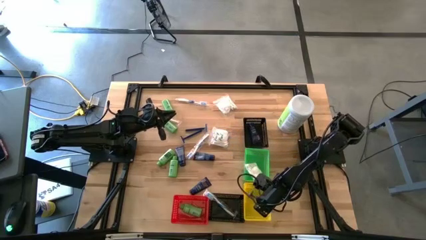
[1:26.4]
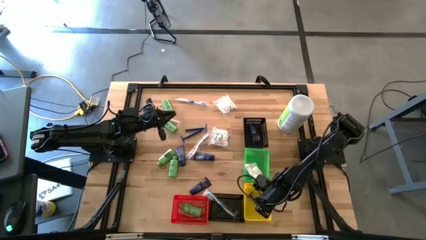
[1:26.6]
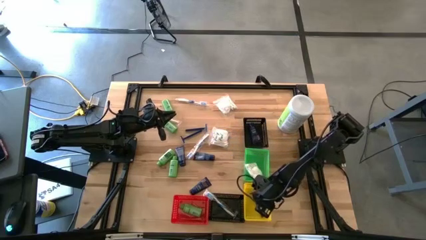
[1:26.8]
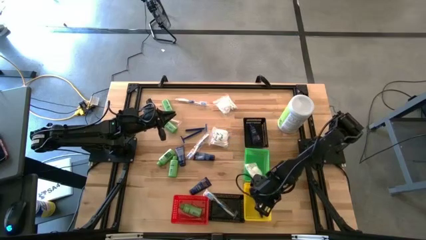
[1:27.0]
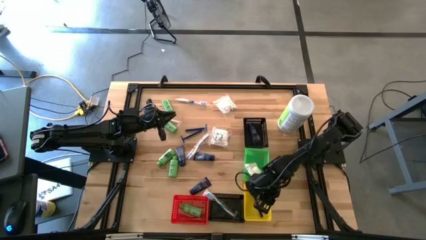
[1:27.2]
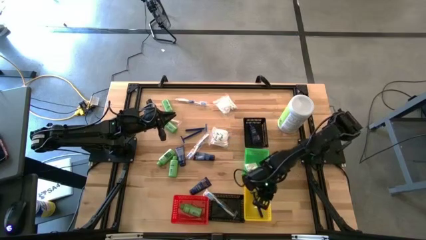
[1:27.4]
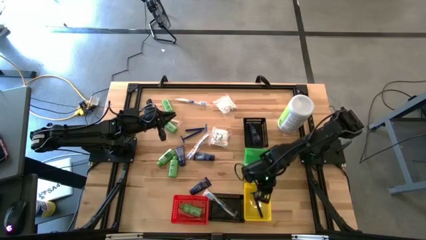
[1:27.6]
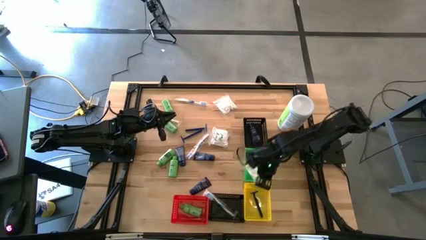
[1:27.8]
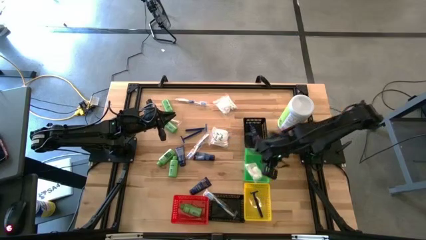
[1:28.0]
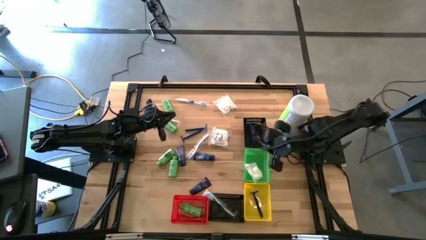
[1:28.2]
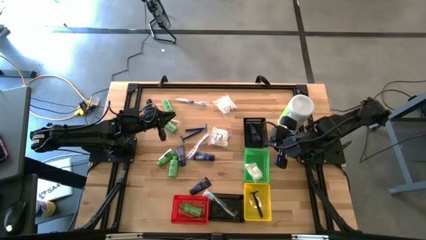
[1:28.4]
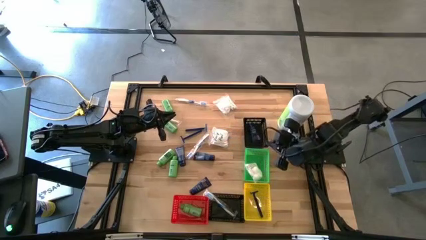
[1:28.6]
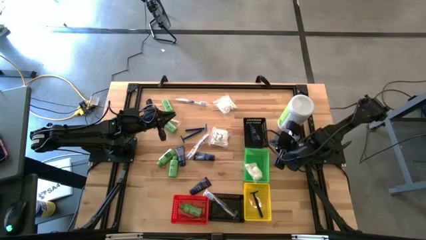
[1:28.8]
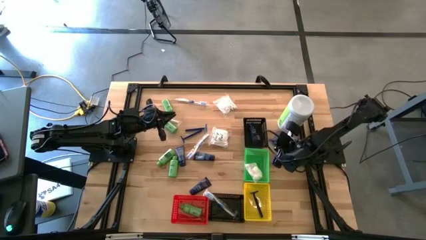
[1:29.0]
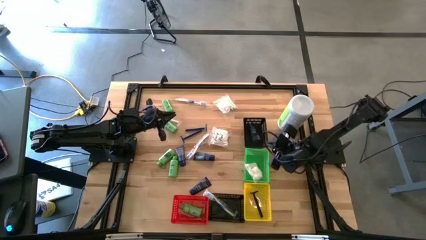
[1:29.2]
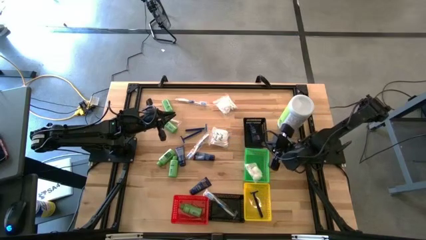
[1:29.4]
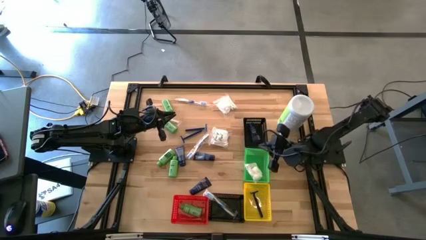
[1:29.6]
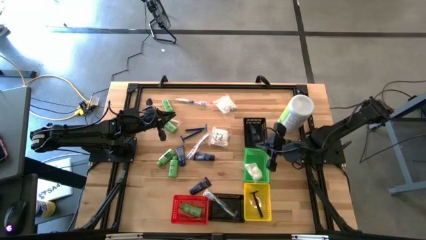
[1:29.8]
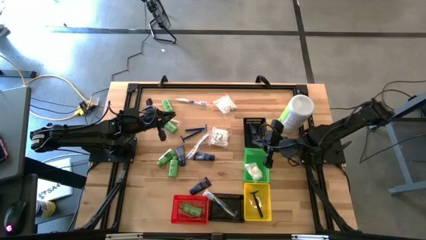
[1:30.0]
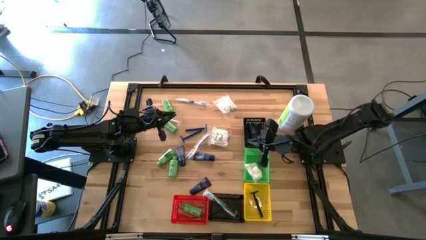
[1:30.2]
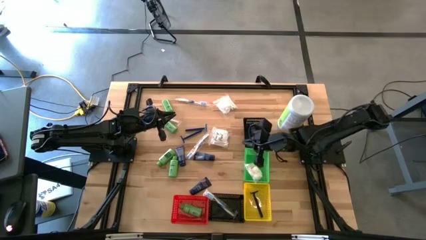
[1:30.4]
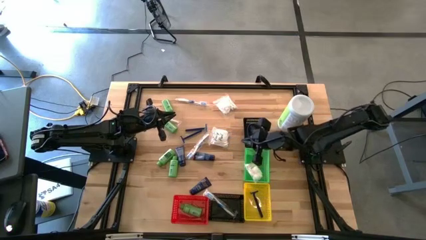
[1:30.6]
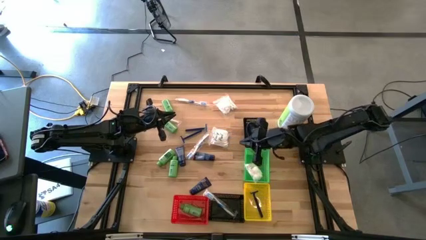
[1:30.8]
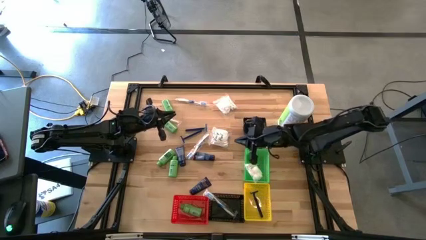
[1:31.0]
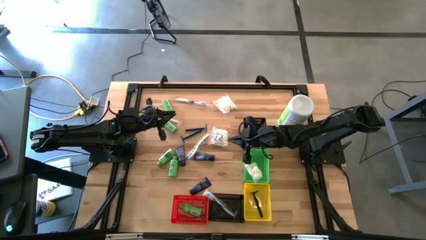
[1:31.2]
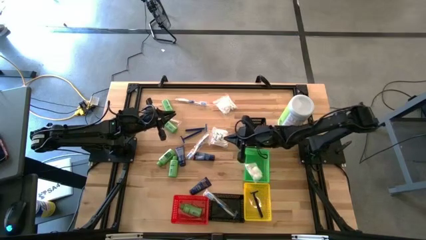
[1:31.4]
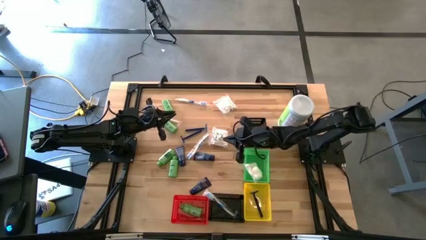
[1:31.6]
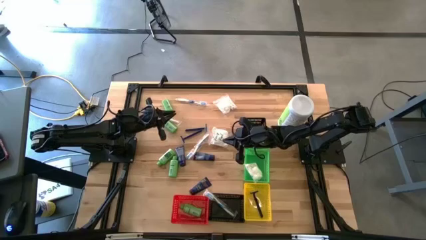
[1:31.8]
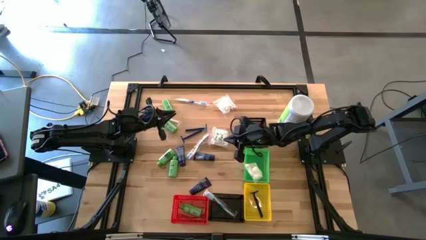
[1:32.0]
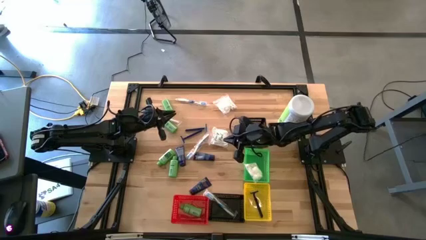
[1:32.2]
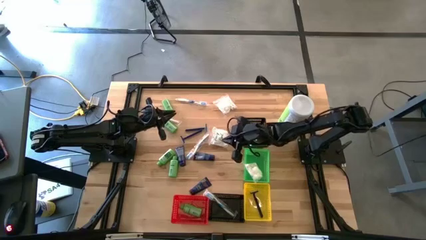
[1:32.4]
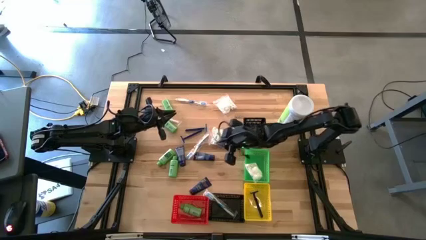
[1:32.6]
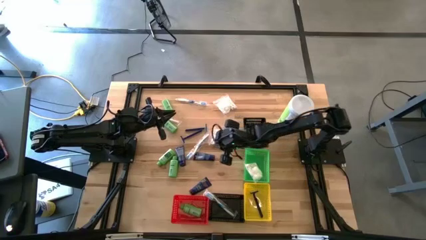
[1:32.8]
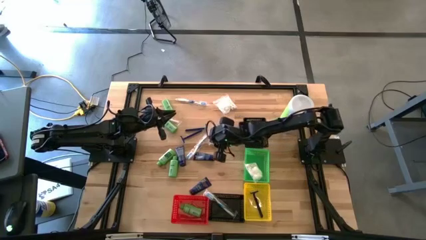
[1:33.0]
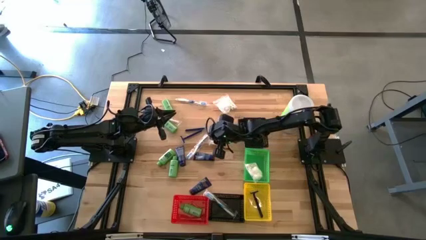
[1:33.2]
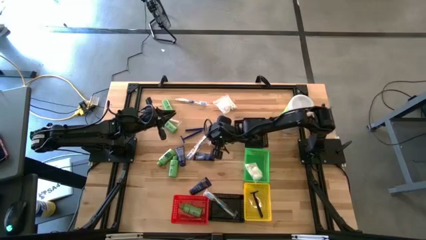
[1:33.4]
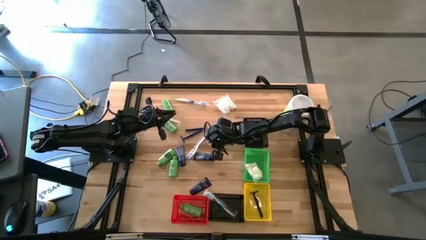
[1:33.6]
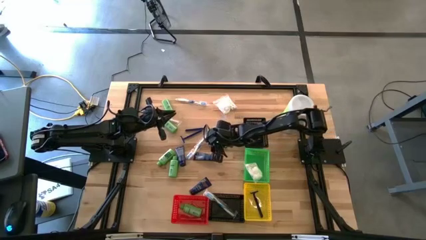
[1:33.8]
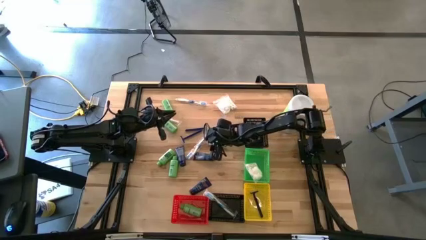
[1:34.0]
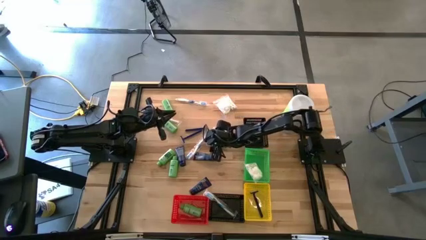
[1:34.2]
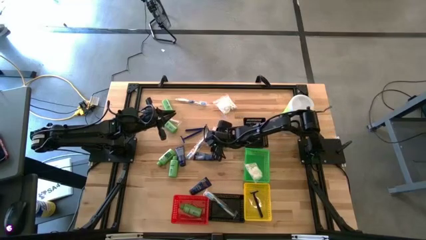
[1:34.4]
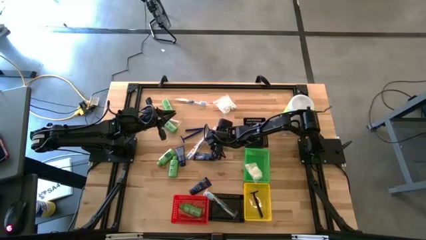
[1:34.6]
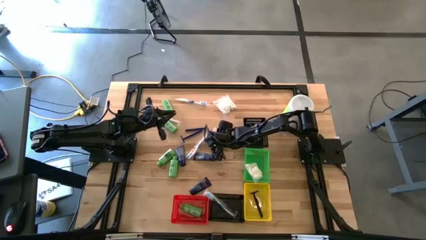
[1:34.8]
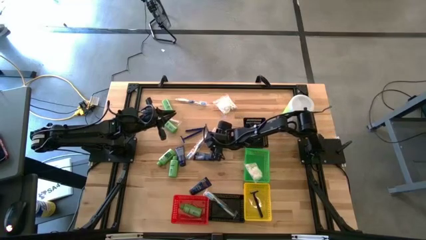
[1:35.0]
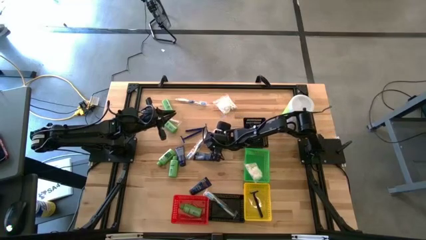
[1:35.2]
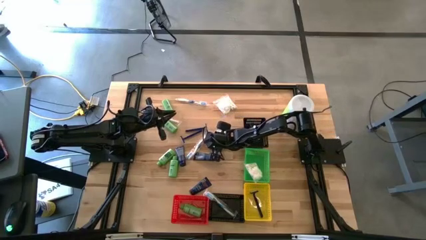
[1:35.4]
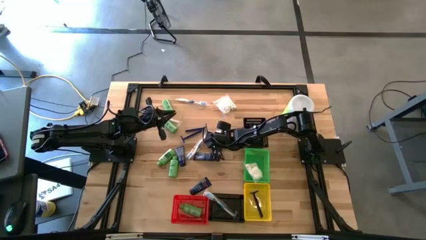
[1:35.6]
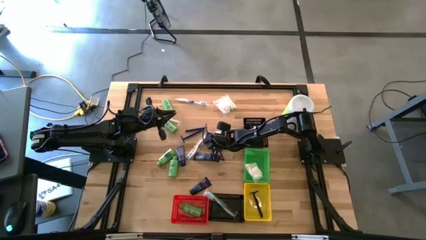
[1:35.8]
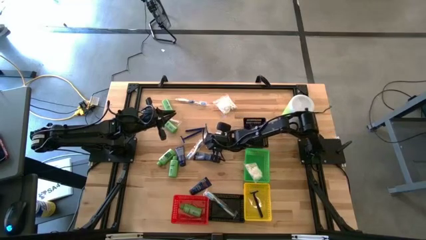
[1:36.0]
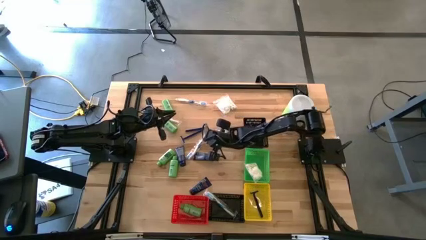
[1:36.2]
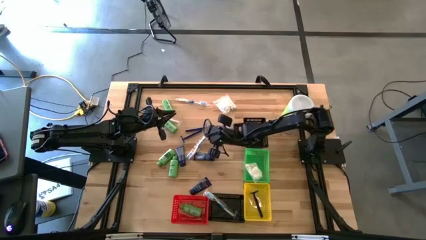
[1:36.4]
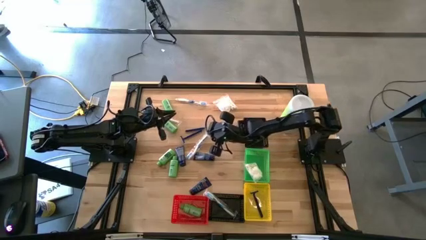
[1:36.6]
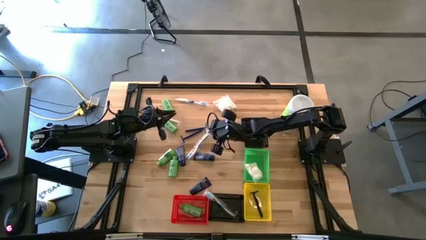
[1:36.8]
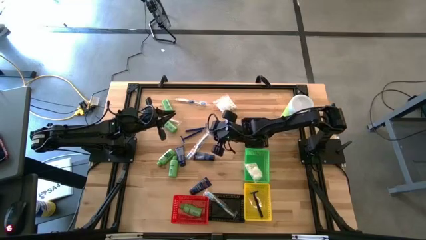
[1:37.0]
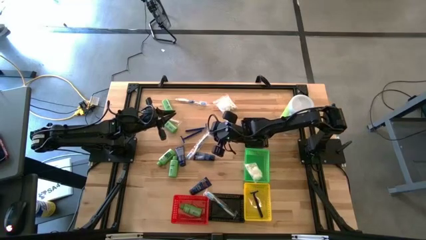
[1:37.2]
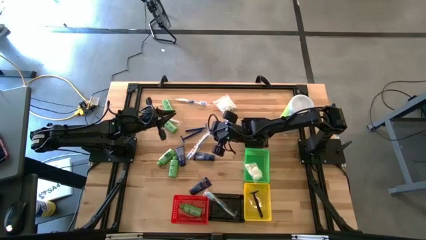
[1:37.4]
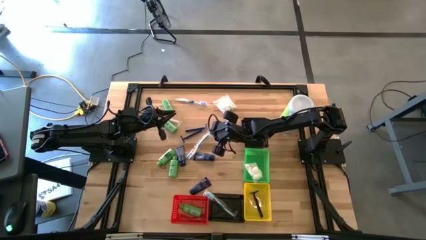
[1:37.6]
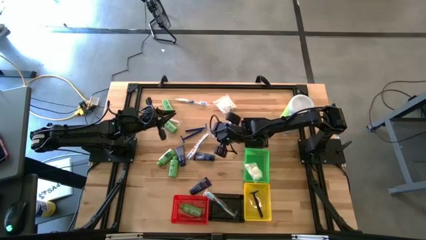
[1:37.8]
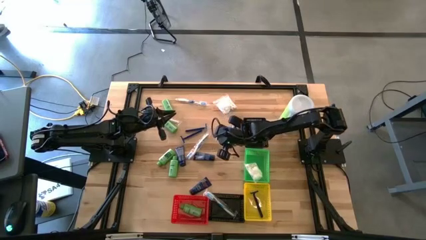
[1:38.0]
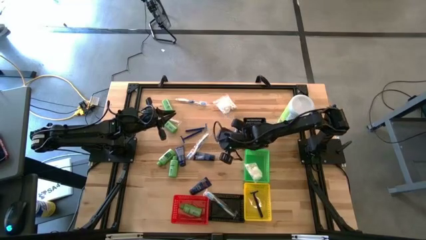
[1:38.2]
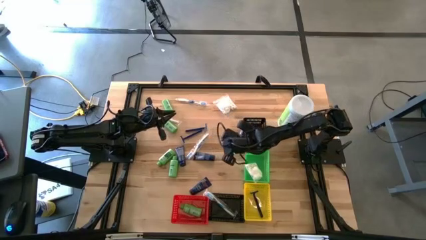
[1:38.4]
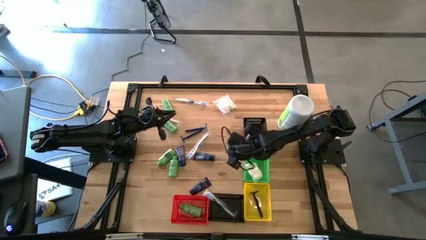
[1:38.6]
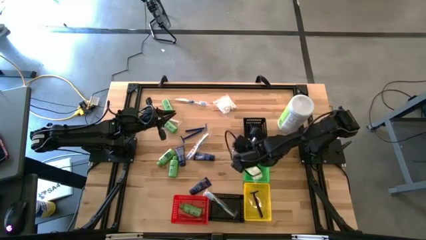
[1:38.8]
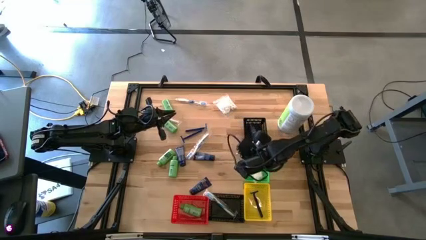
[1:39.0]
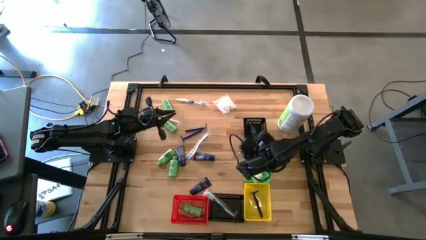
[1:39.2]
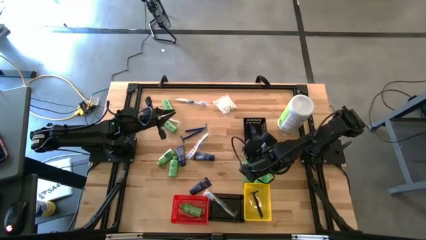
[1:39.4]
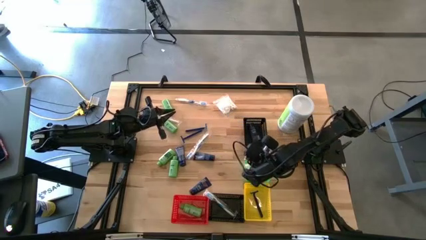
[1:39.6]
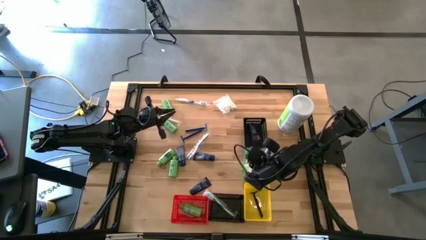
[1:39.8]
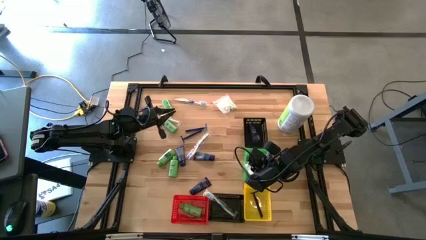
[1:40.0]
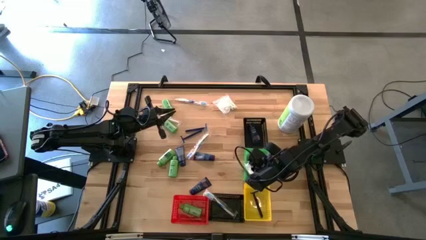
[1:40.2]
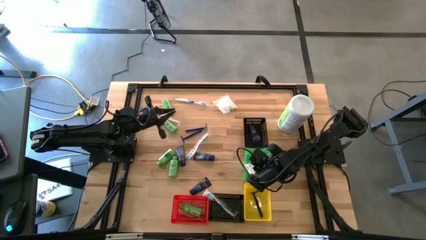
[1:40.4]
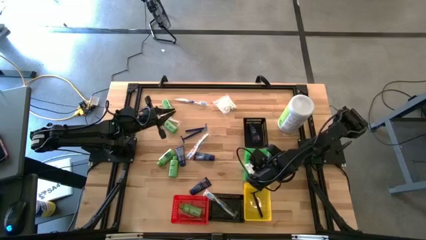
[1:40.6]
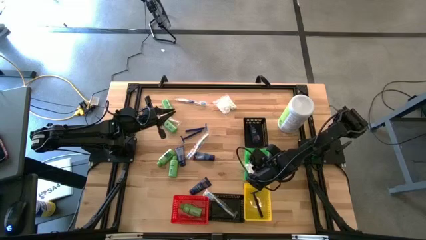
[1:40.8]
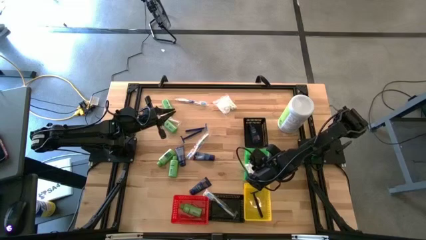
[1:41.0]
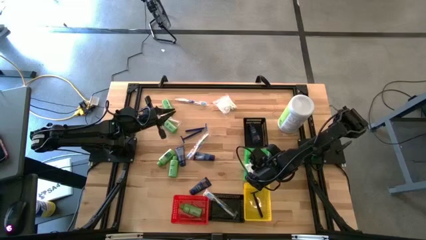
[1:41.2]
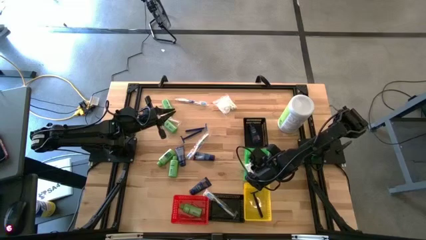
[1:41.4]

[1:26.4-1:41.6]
Task: Pick & Place Travel size toiletries
Put the bottom cotton pack into the green bin
